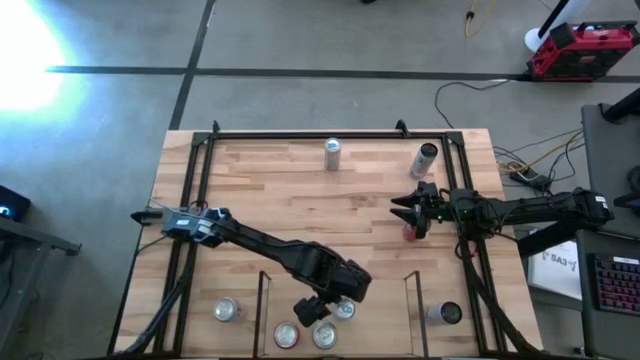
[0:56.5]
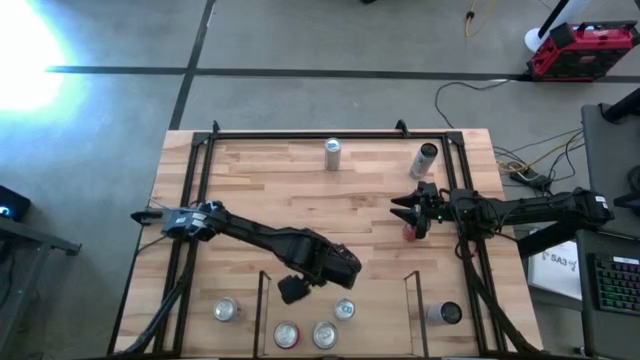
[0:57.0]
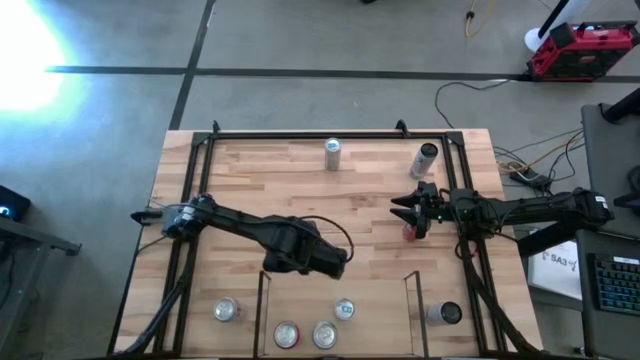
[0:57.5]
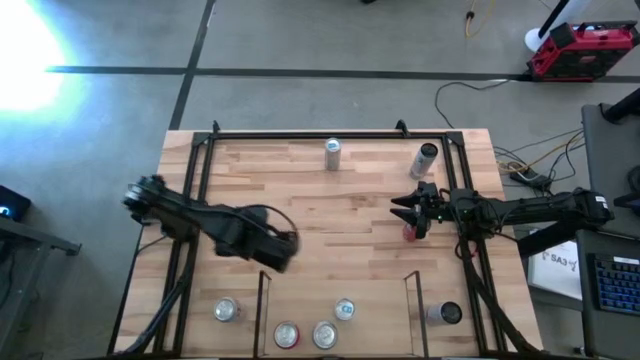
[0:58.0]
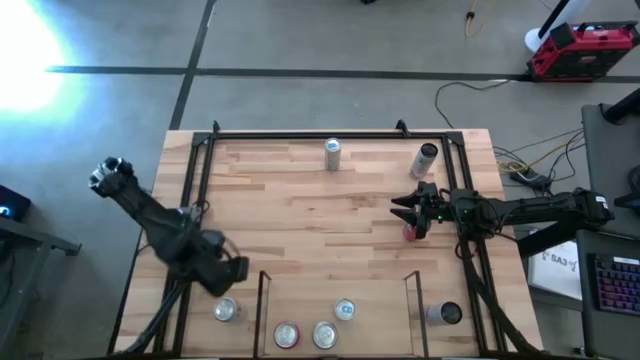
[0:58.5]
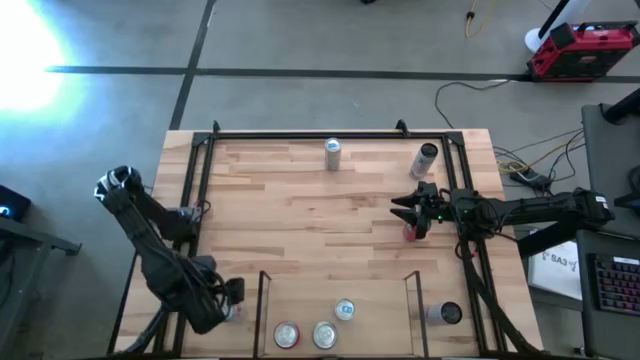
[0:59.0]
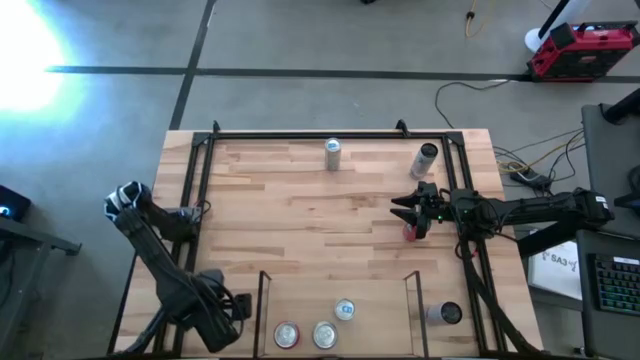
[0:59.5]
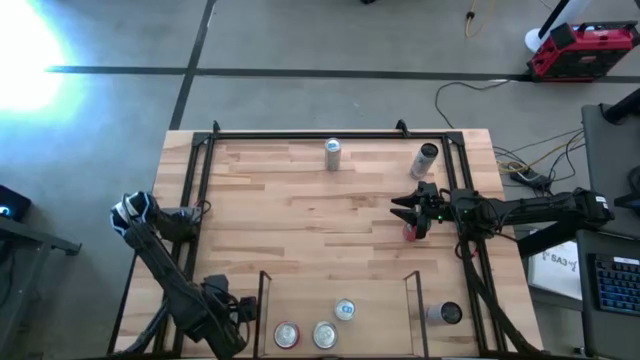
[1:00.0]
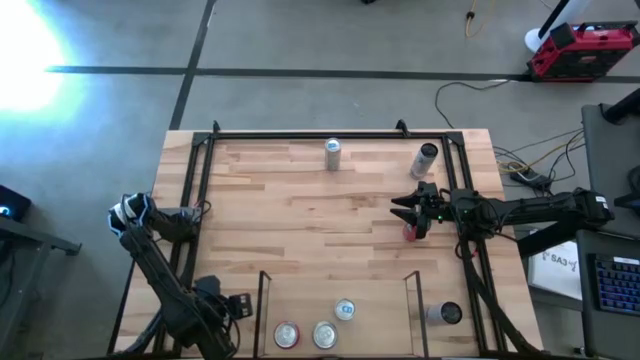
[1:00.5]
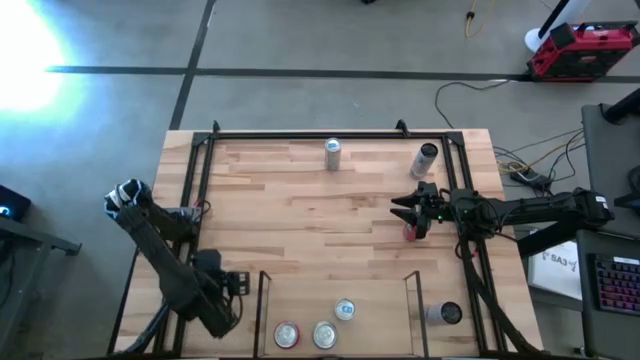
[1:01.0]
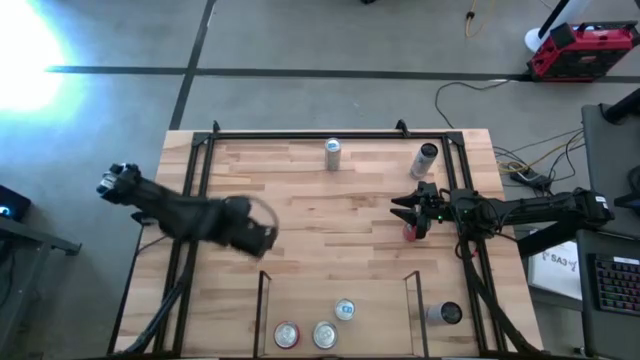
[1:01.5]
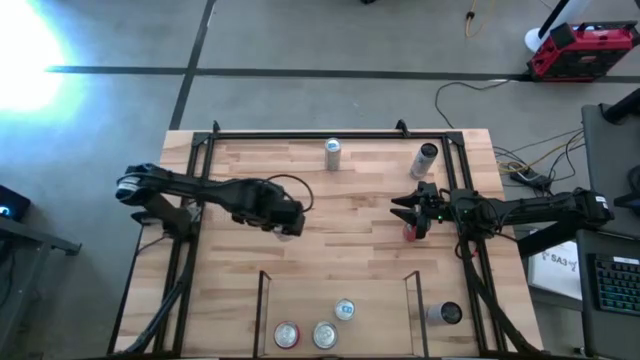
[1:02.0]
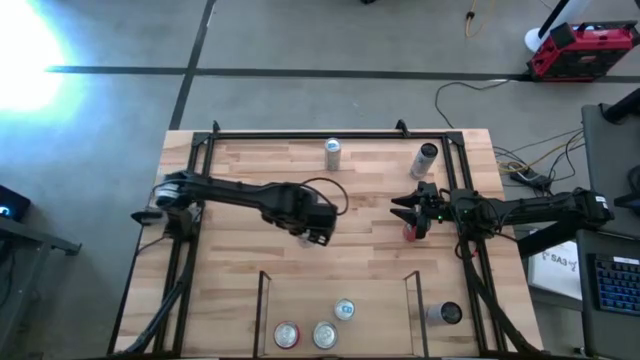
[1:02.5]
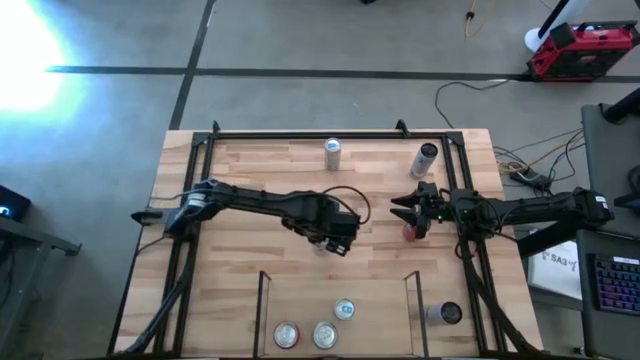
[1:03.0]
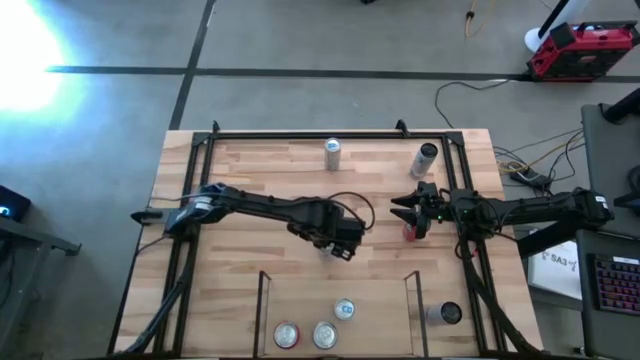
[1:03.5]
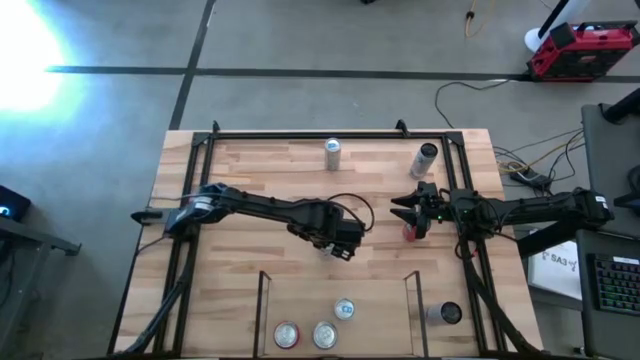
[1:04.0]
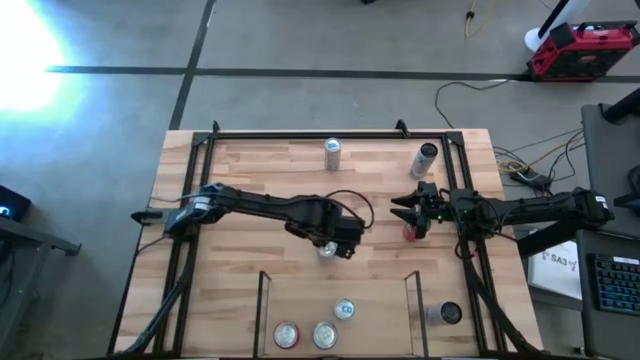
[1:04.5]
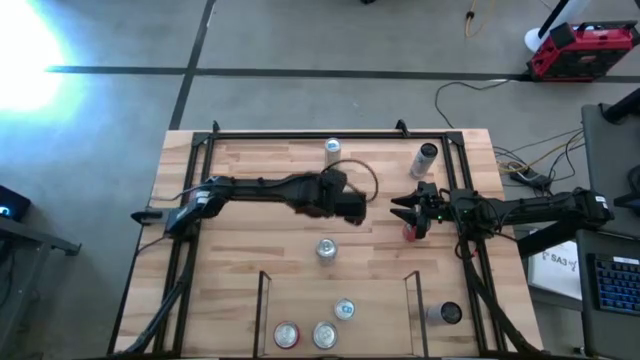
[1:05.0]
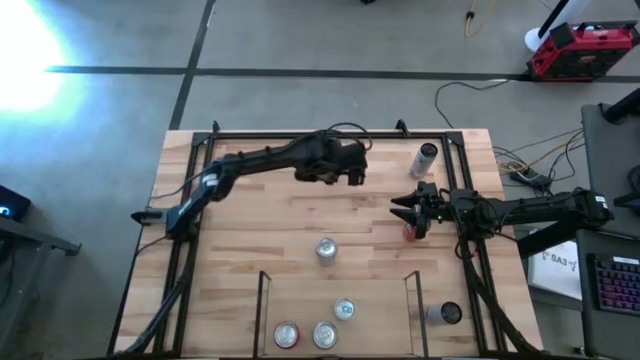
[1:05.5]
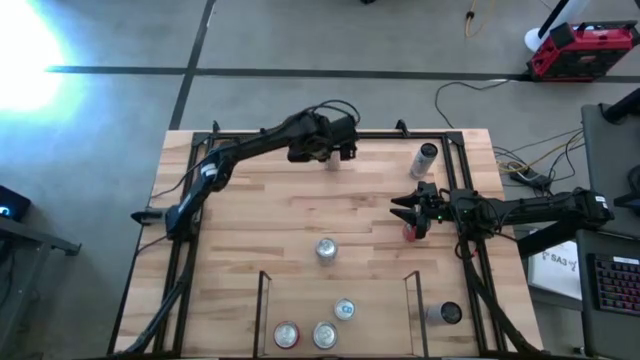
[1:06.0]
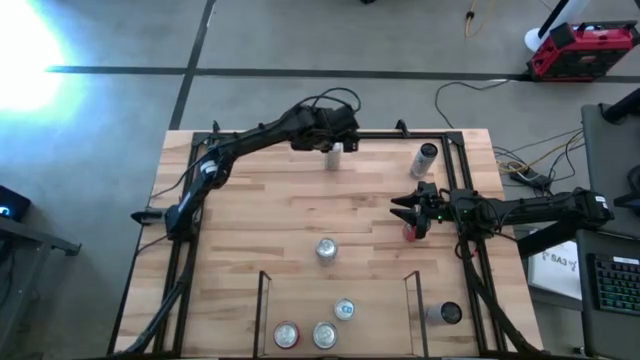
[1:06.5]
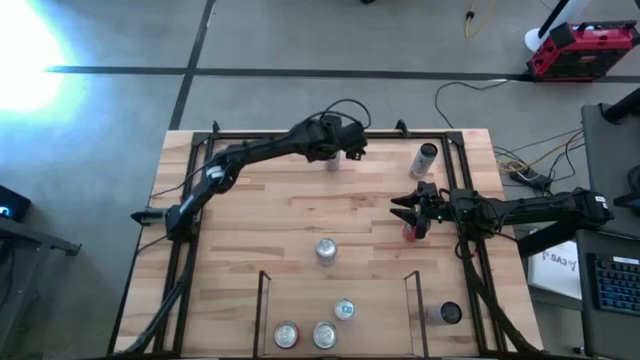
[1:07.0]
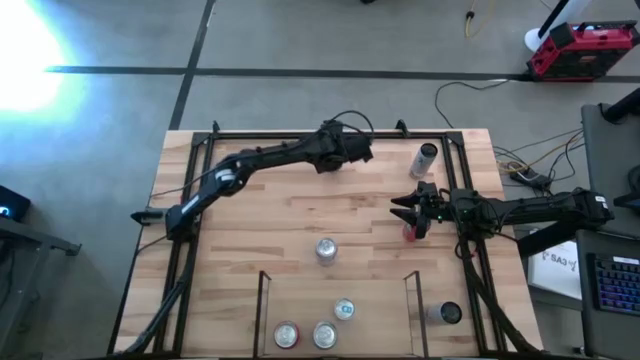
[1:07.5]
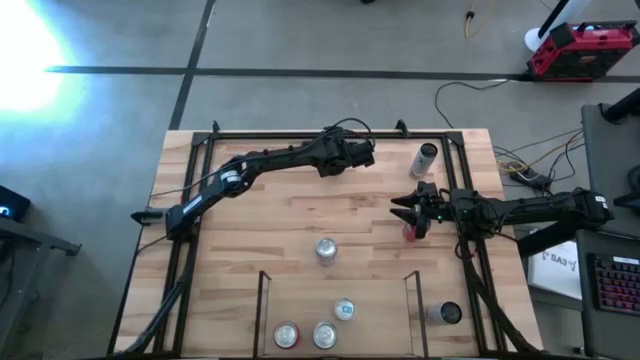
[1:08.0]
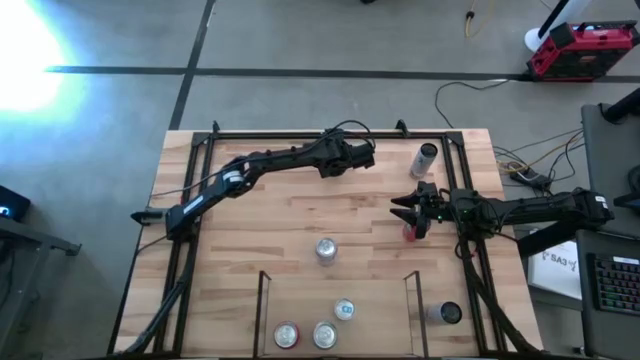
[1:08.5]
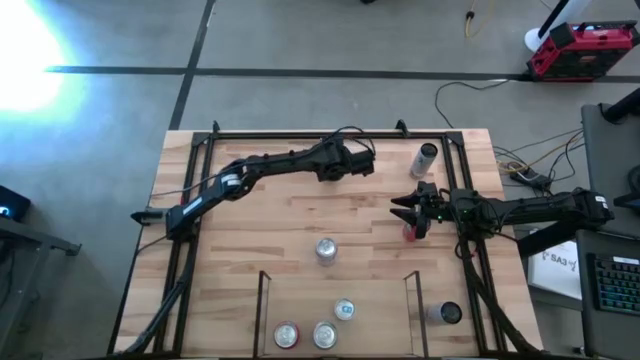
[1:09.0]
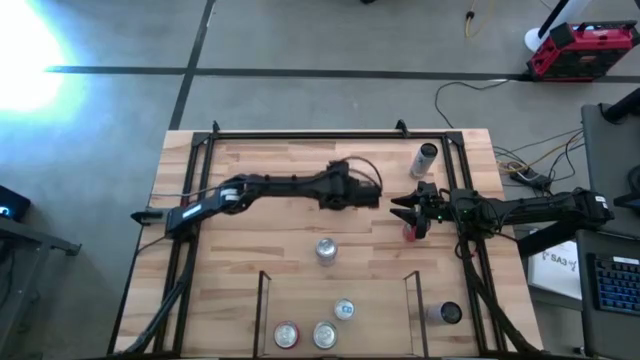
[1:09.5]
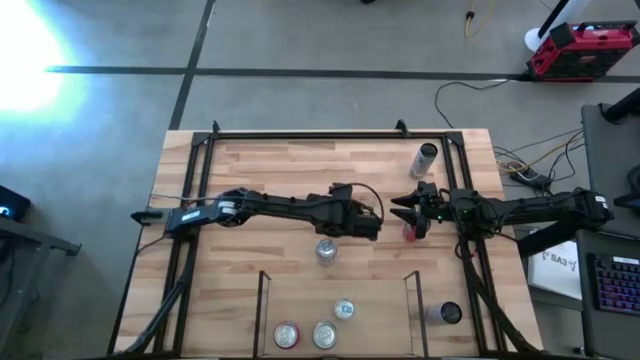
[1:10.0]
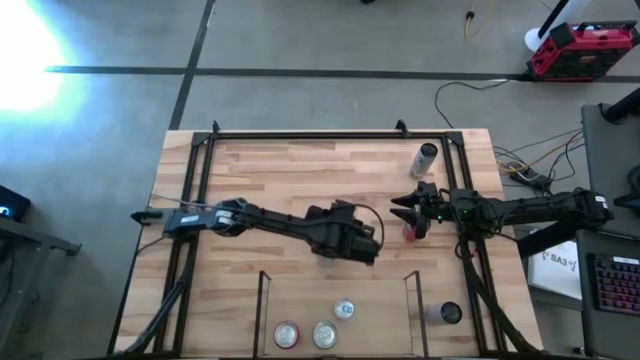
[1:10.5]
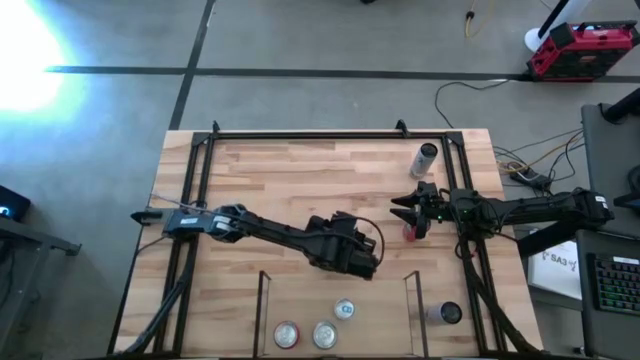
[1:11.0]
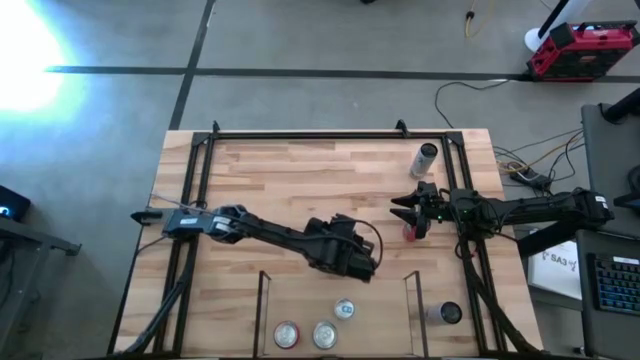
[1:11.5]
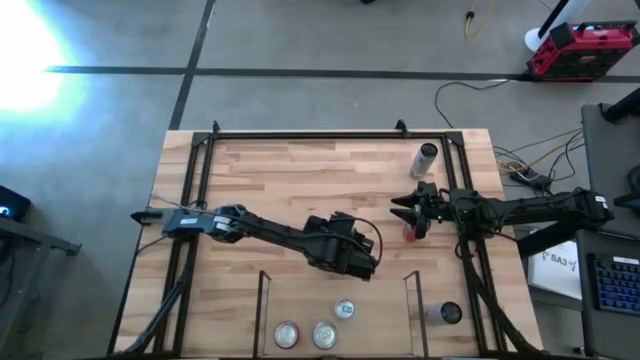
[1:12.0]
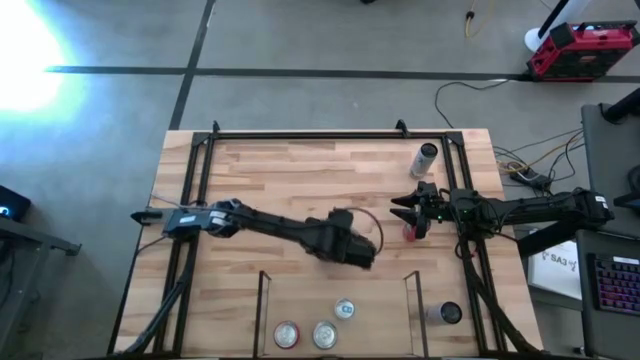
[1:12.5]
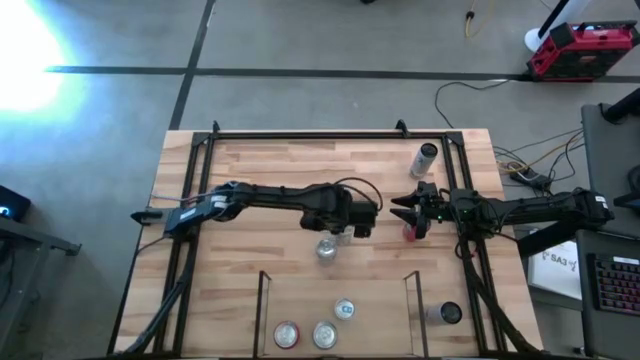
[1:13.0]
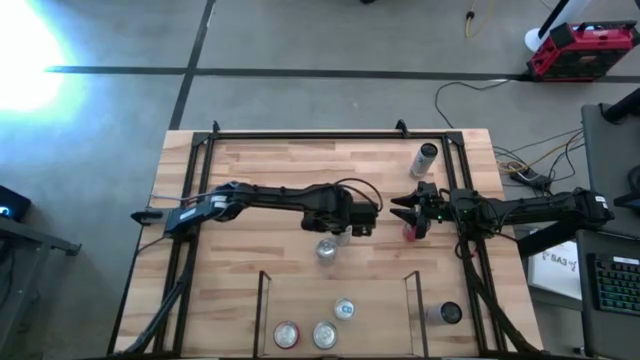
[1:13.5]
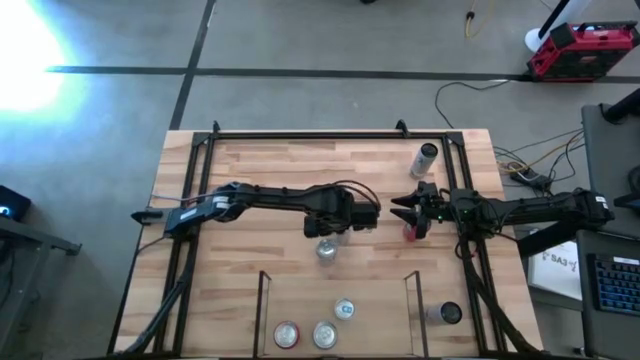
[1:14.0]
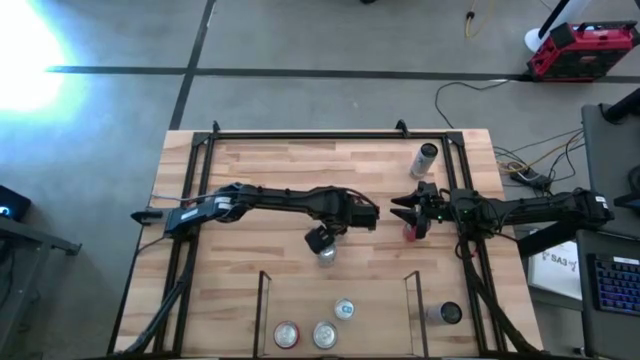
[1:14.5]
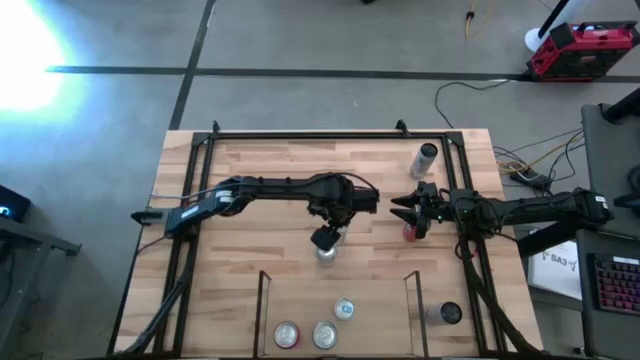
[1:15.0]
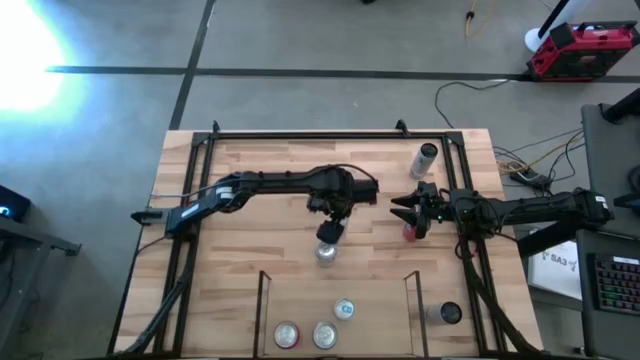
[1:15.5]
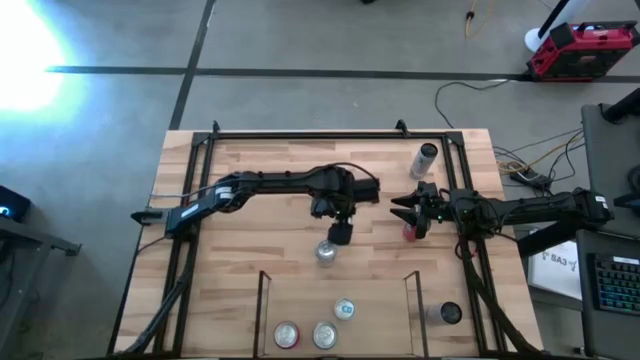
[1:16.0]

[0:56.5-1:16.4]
Task: Place canned beverage on shelf
Move the soda cans to the middle of the table

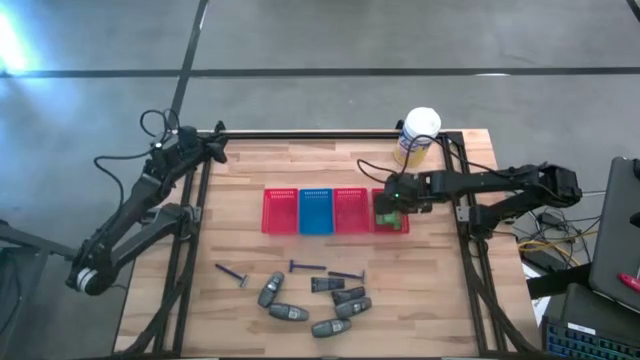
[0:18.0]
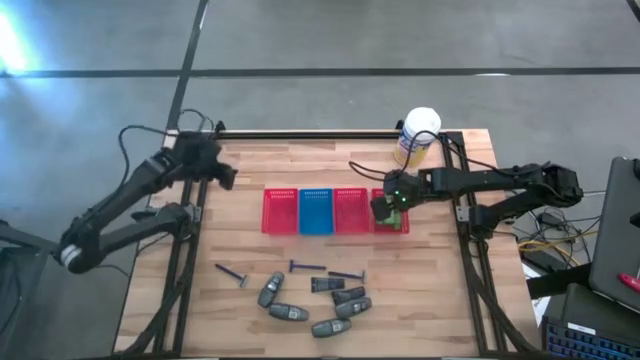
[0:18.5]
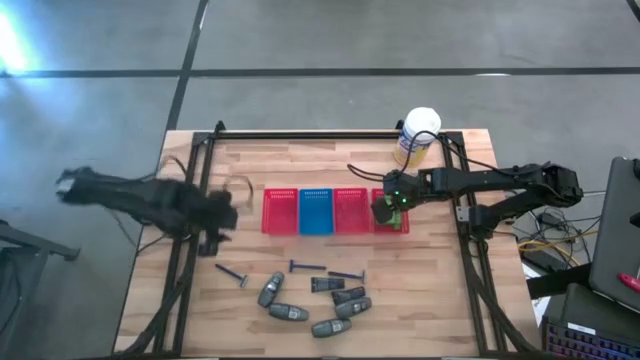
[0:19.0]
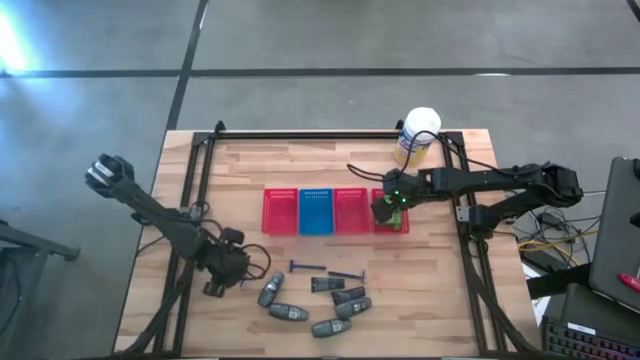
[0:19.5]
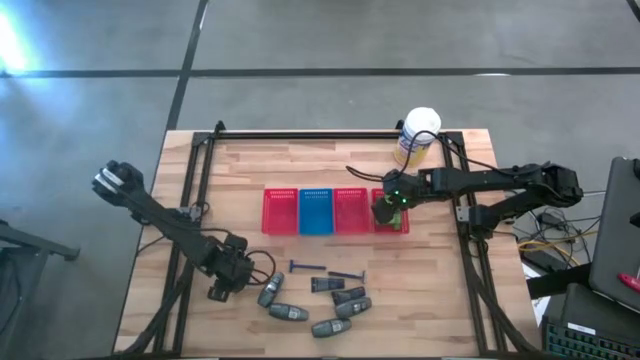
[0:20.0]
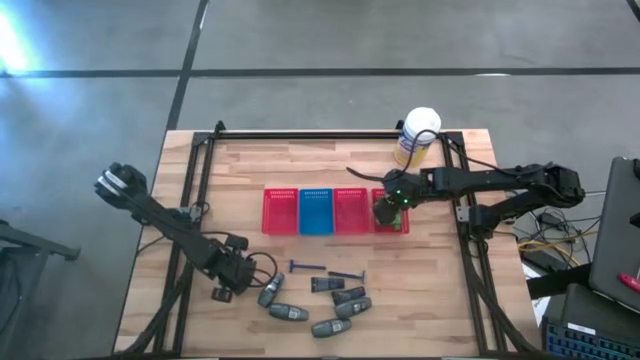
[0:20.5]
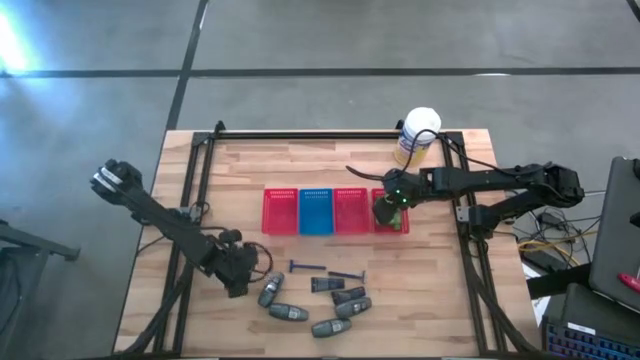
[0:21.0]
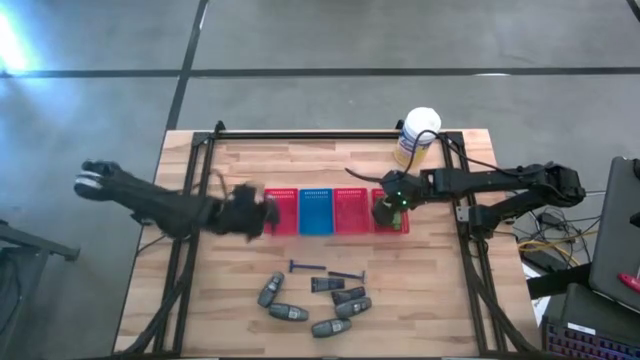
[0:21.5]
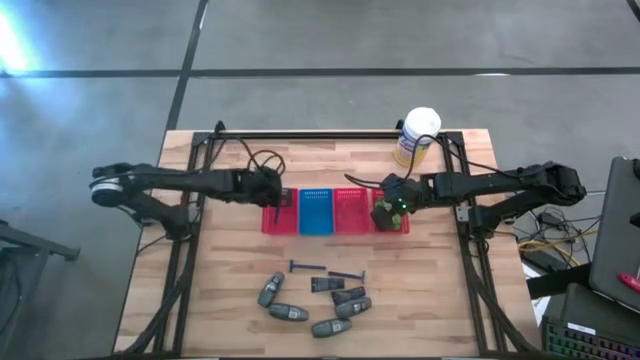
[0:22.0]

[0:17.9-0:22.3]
Task: Pick & Place Travel size toiletries
Put the blue razor into the left red bin
